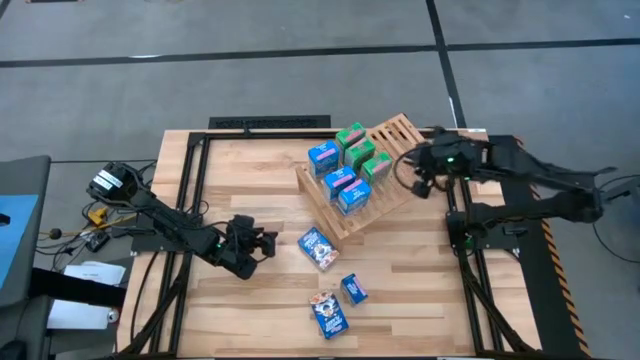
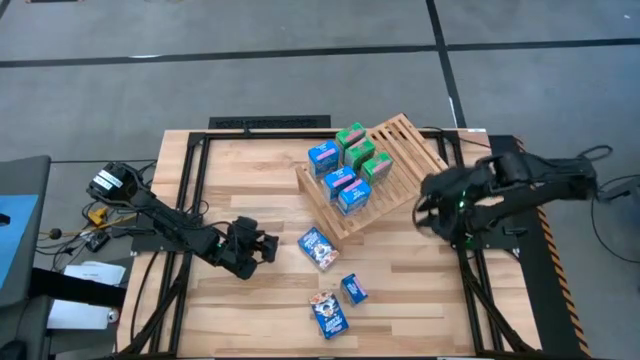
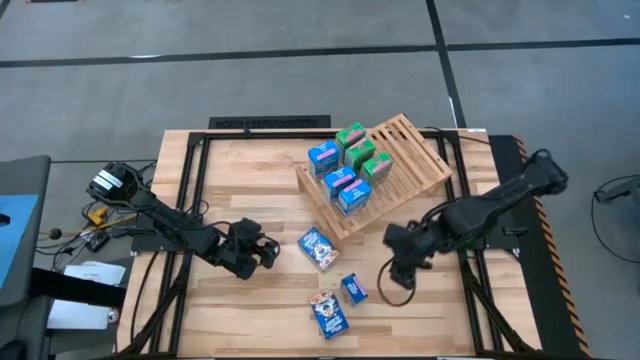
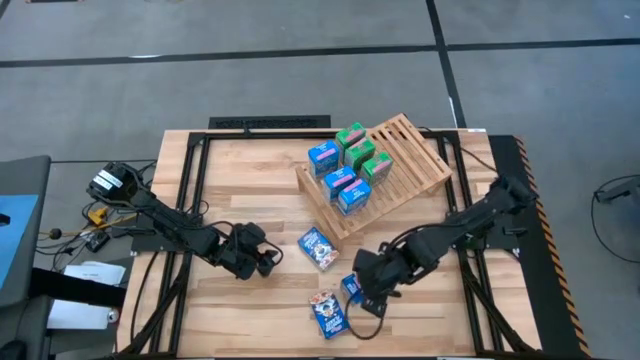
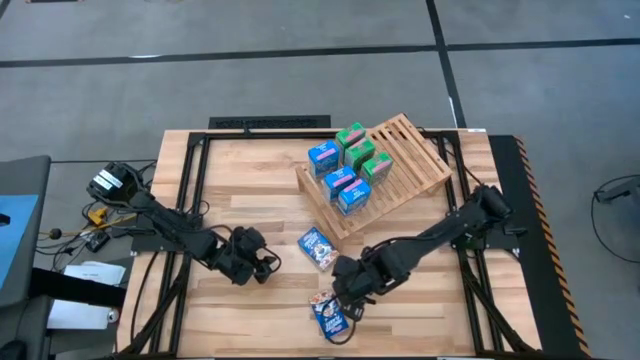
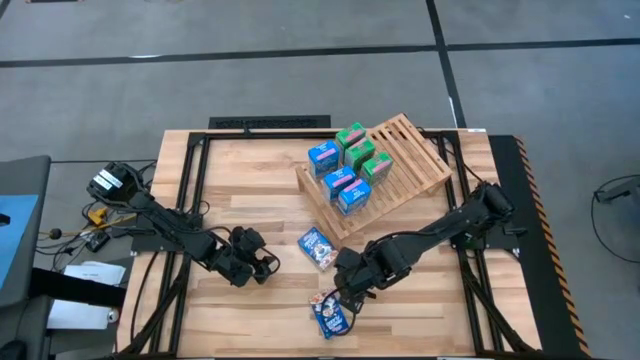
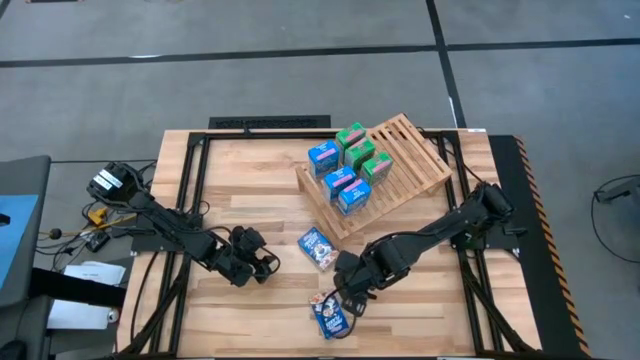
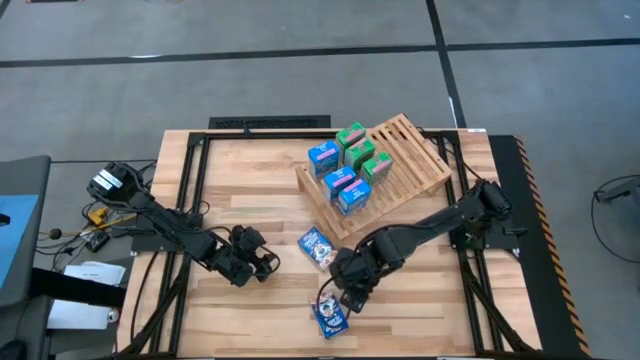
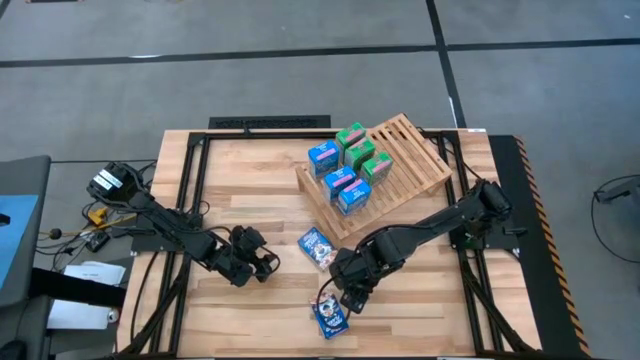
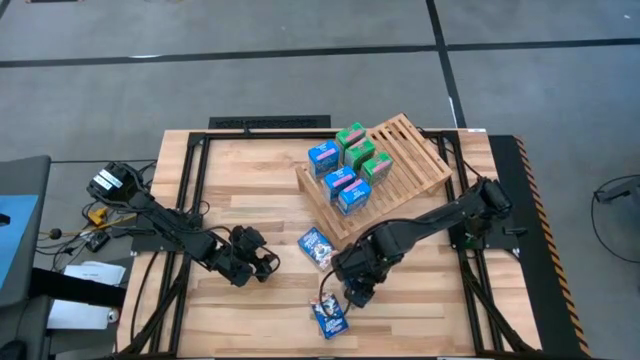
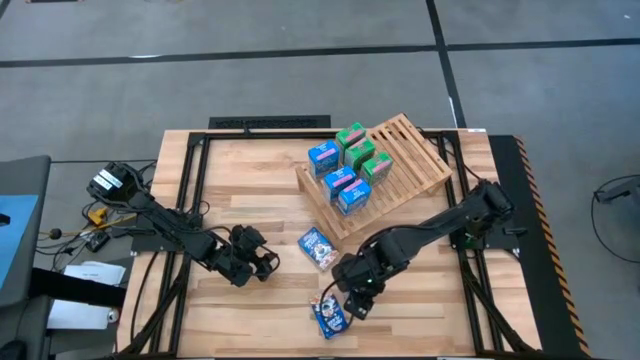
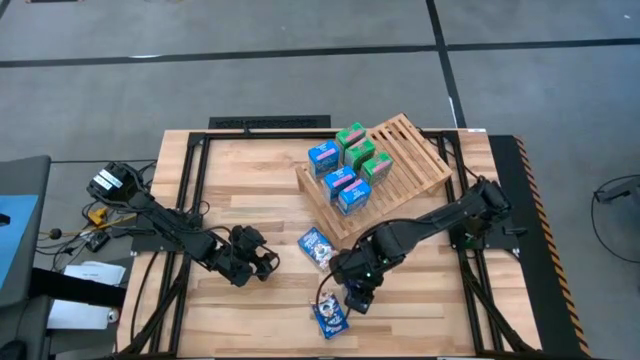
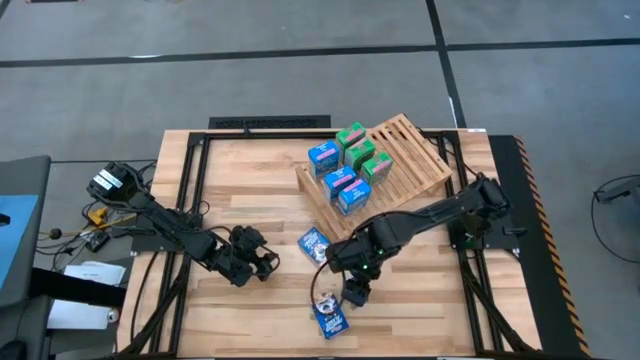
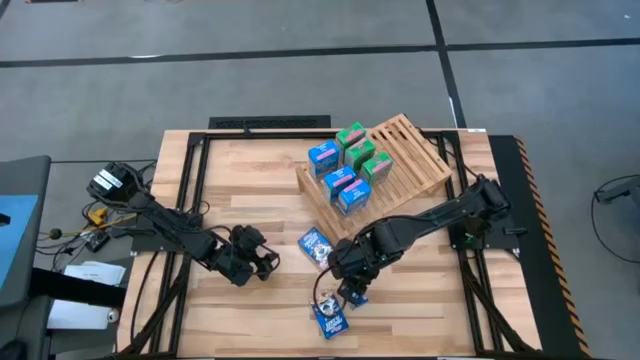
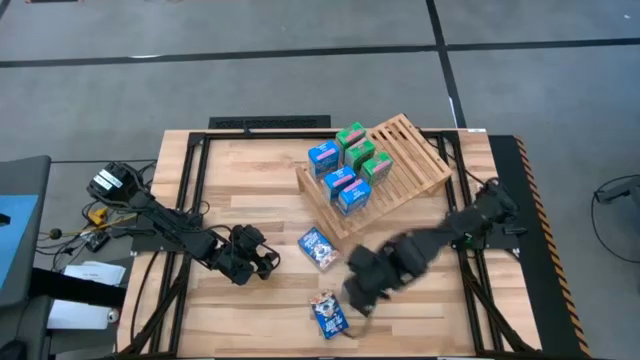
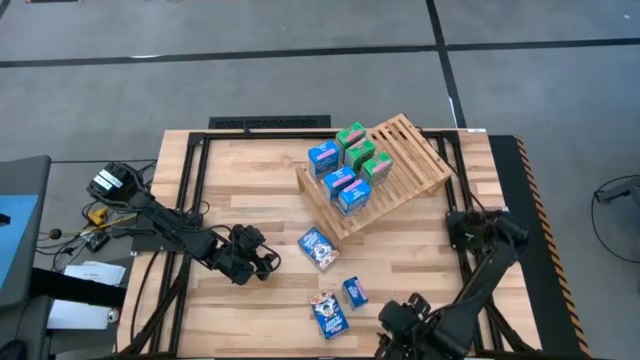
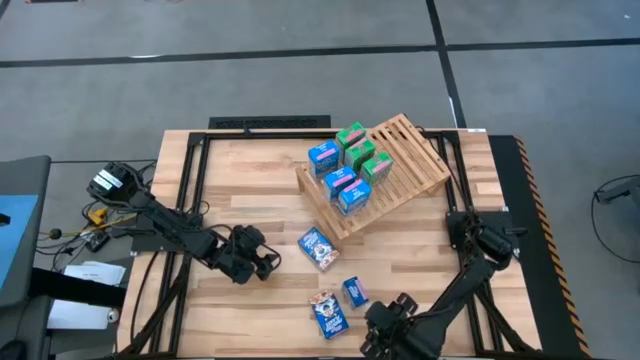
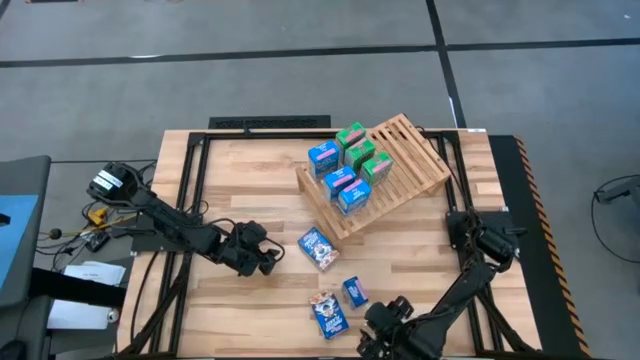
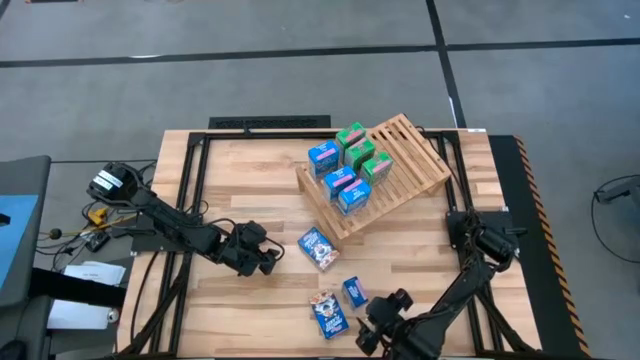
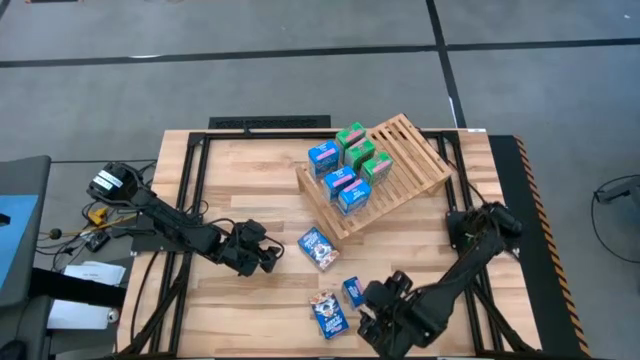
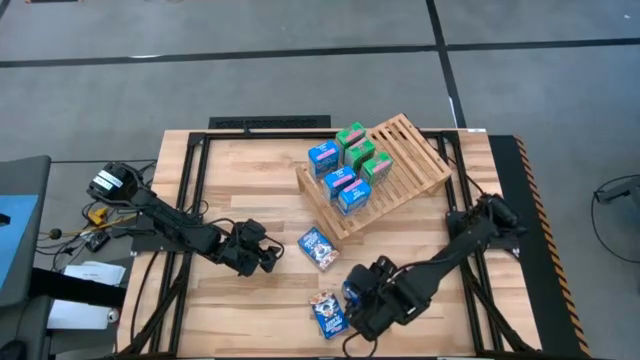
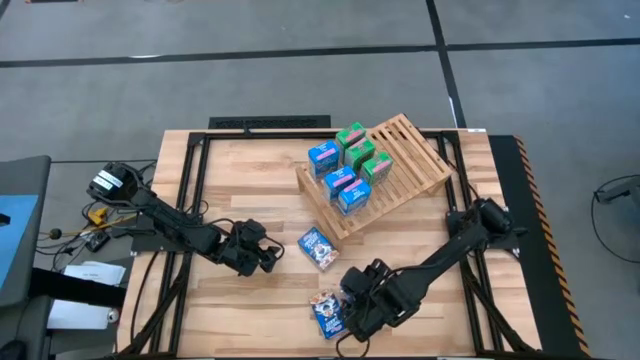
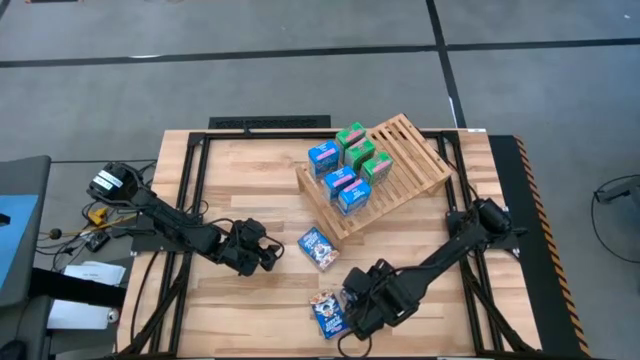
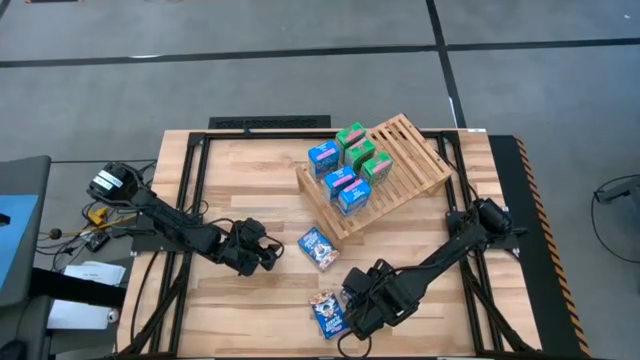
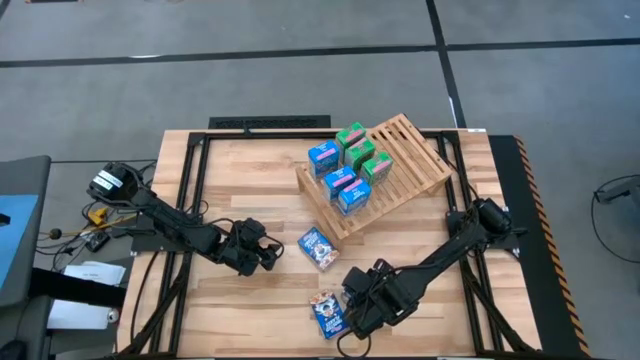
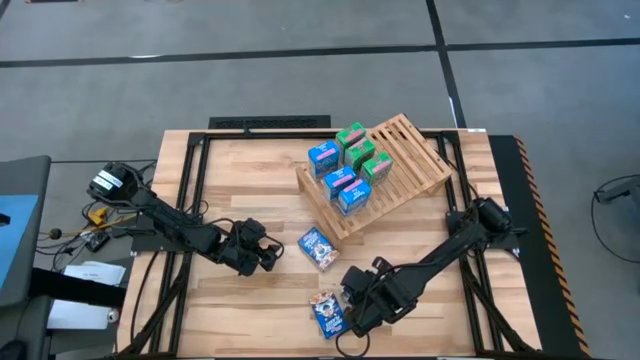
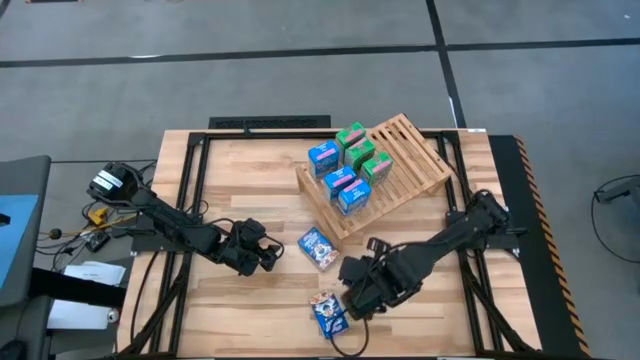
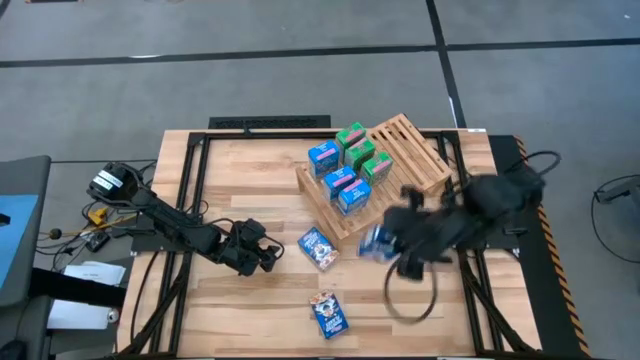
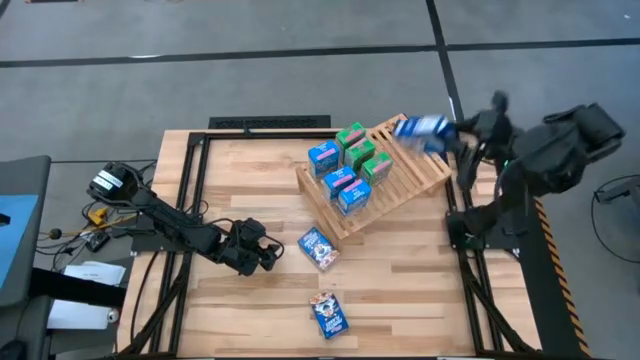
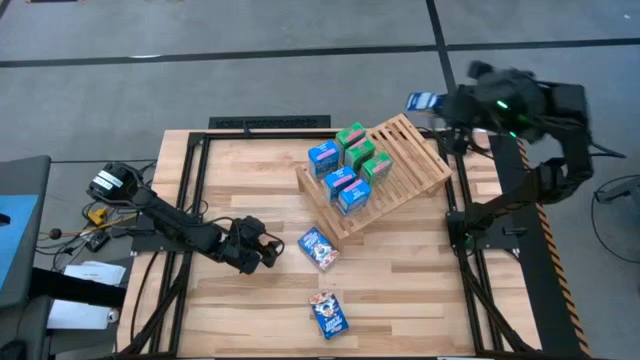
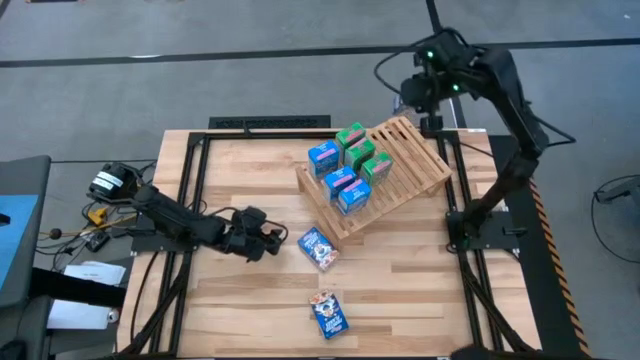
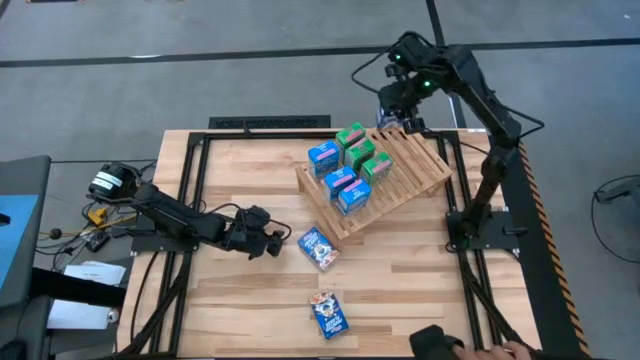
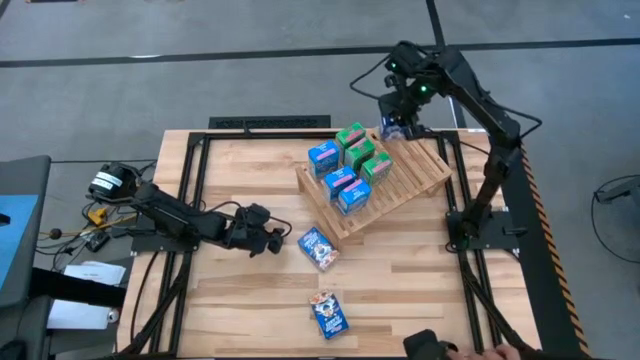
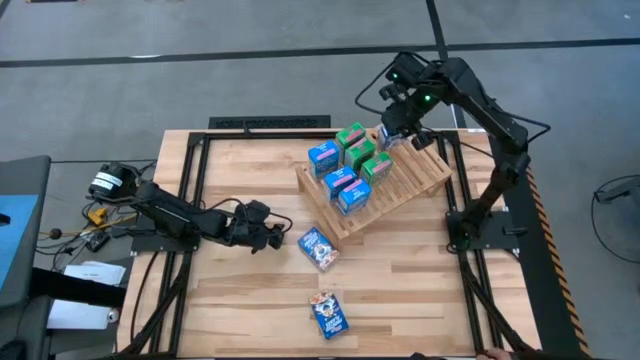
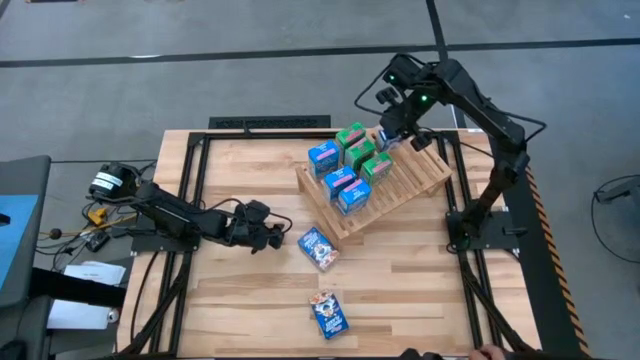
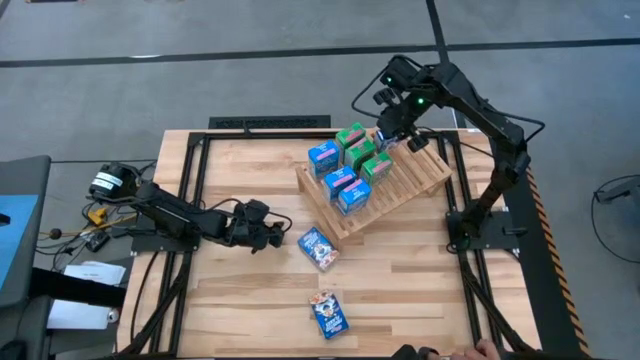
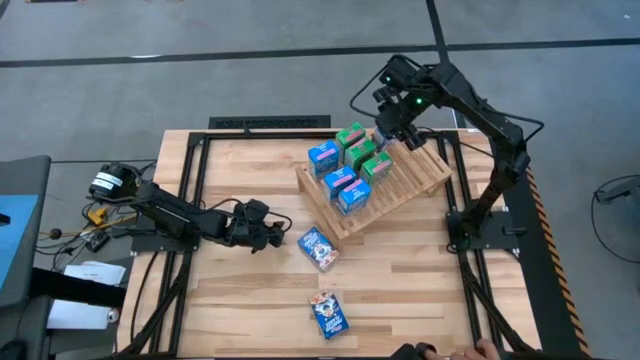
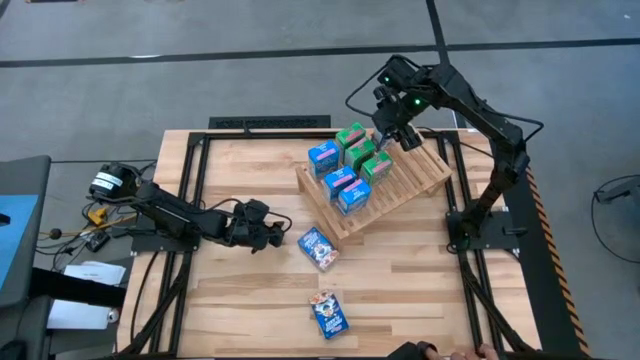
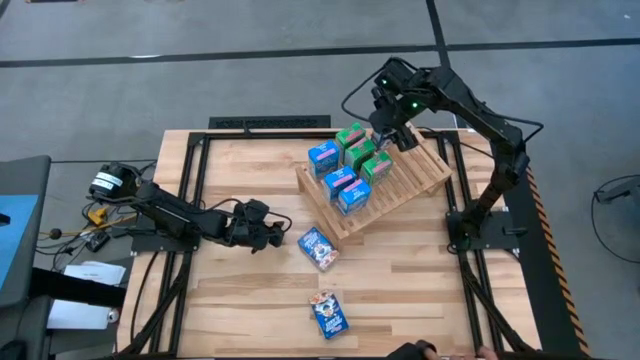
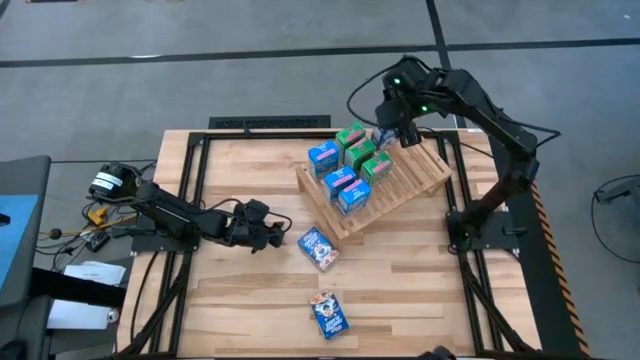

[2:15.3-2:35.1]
Task: Stack cereal on shelf
Put the middle blue cereal box on the shelf
